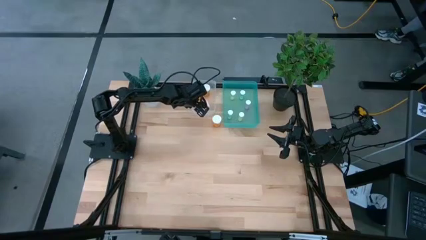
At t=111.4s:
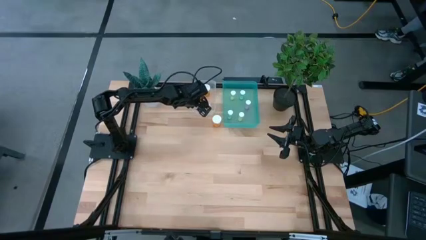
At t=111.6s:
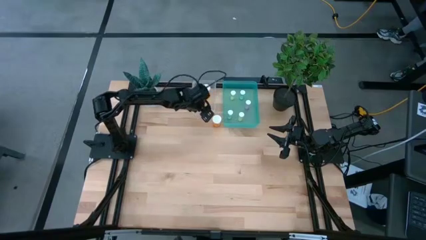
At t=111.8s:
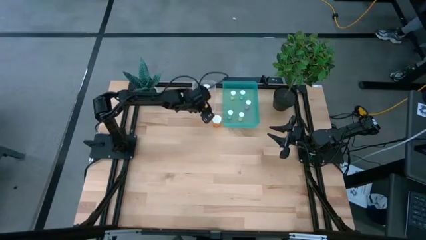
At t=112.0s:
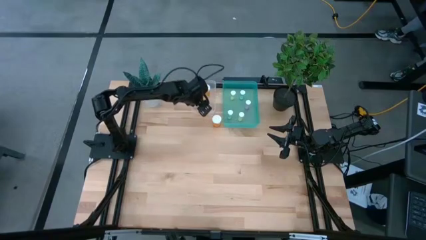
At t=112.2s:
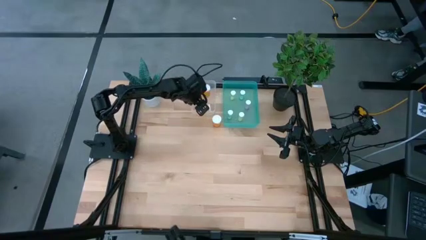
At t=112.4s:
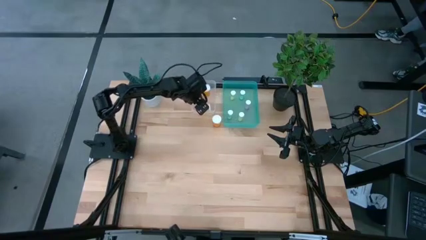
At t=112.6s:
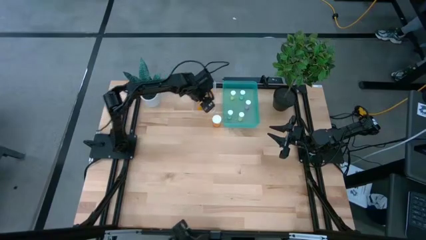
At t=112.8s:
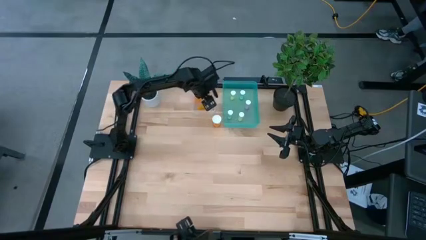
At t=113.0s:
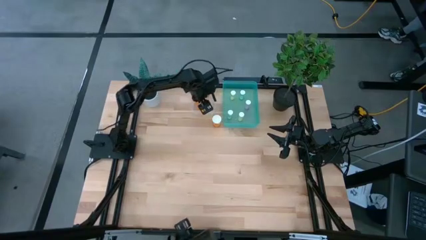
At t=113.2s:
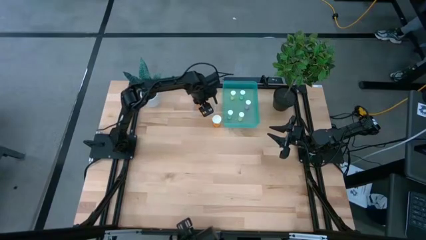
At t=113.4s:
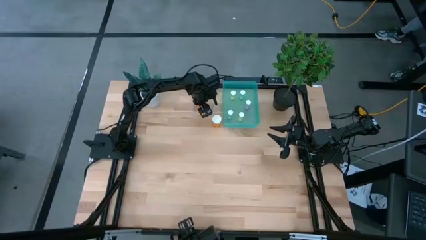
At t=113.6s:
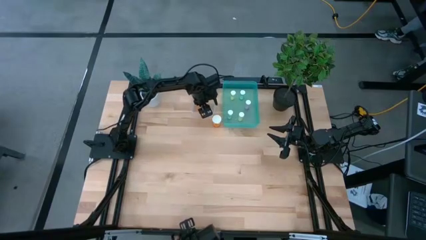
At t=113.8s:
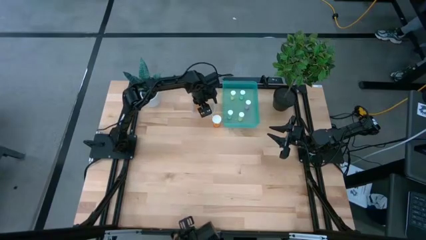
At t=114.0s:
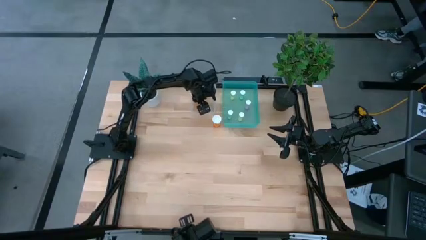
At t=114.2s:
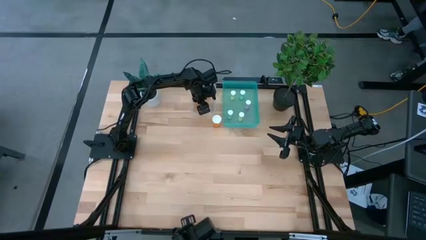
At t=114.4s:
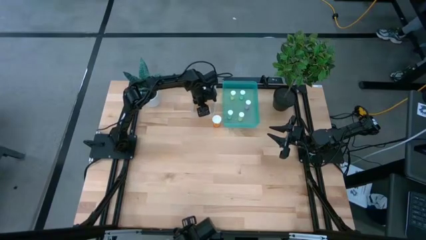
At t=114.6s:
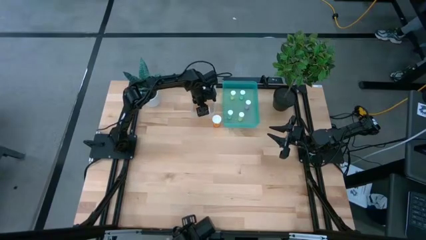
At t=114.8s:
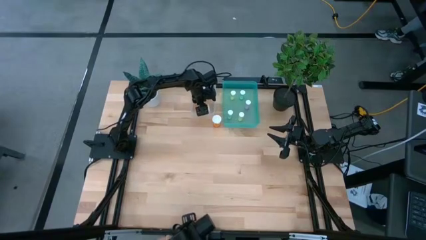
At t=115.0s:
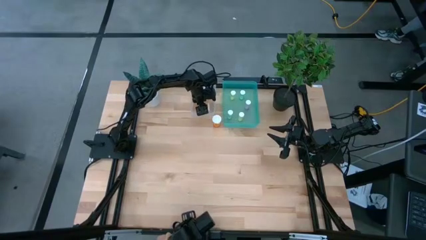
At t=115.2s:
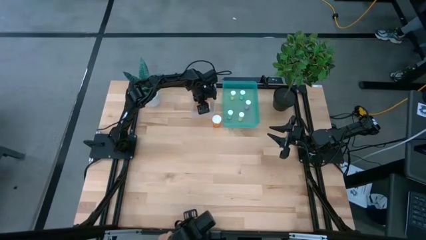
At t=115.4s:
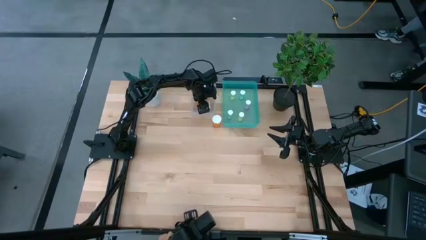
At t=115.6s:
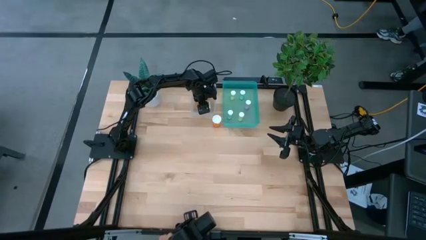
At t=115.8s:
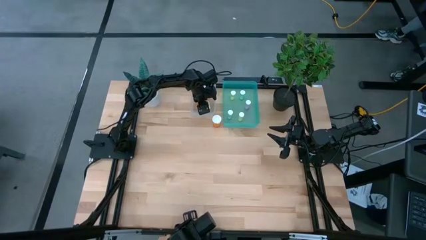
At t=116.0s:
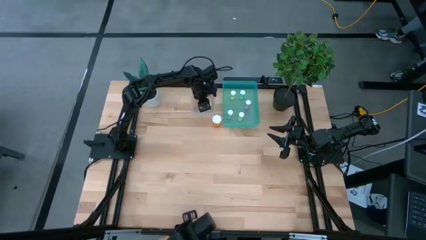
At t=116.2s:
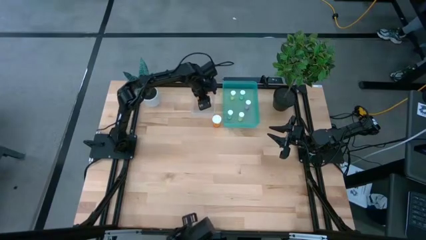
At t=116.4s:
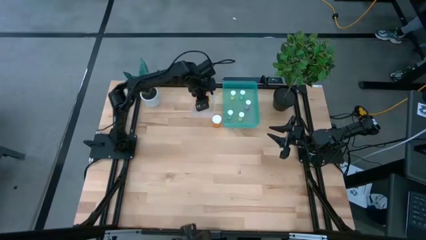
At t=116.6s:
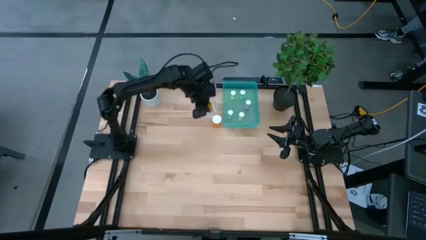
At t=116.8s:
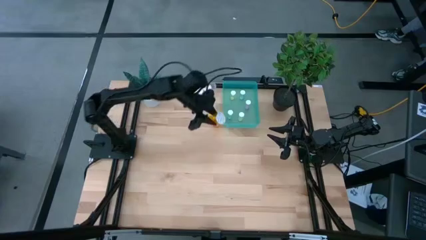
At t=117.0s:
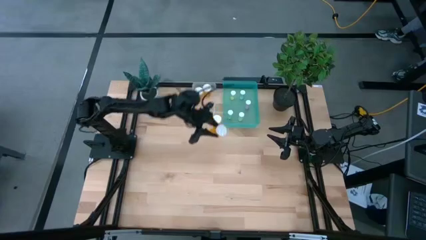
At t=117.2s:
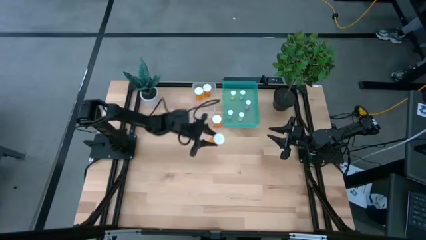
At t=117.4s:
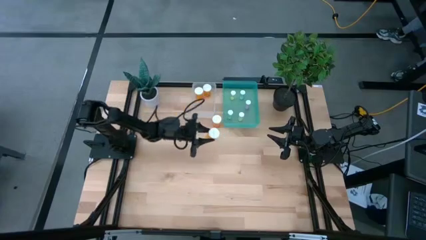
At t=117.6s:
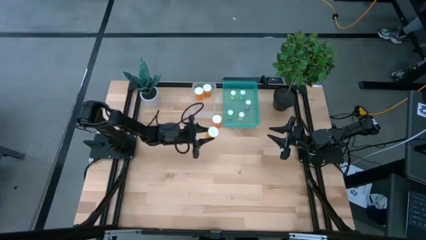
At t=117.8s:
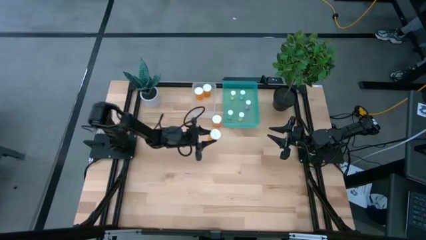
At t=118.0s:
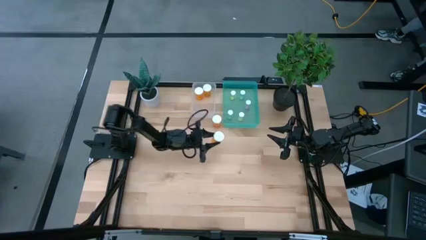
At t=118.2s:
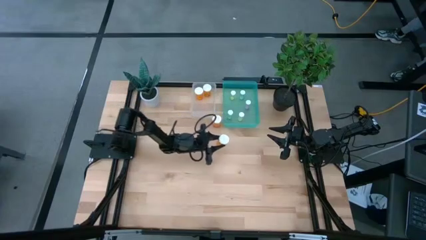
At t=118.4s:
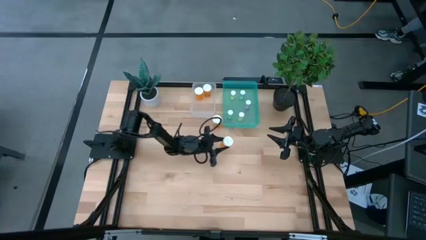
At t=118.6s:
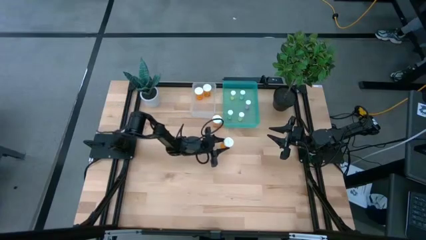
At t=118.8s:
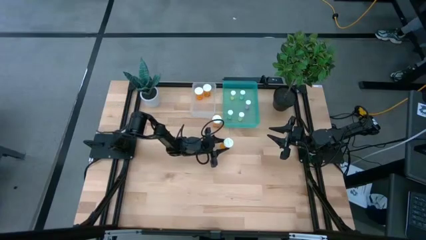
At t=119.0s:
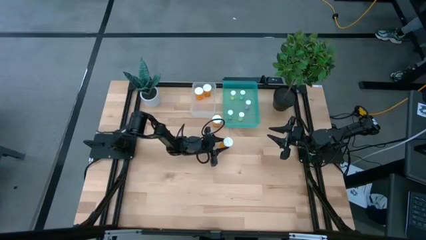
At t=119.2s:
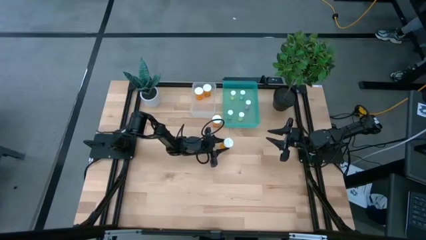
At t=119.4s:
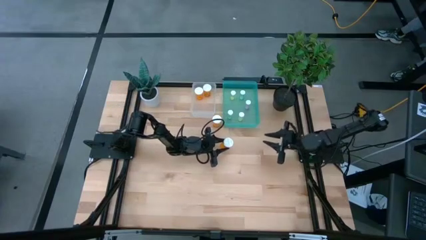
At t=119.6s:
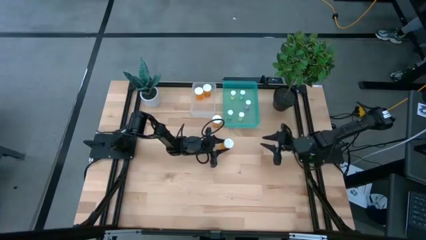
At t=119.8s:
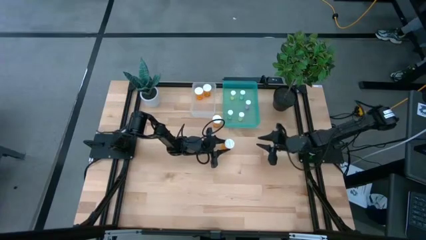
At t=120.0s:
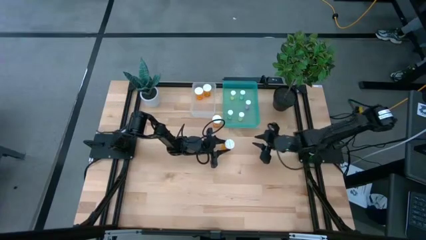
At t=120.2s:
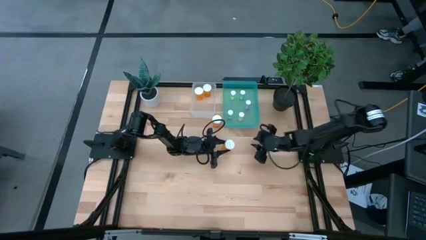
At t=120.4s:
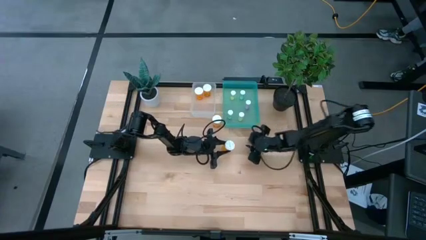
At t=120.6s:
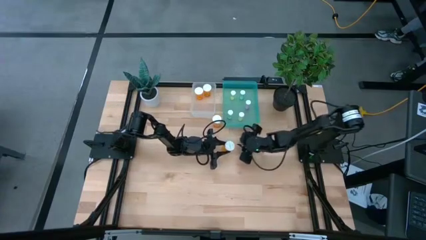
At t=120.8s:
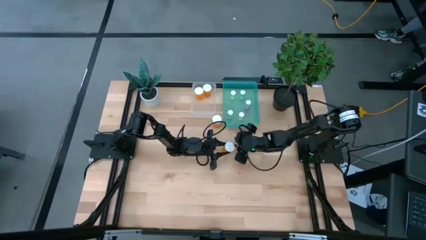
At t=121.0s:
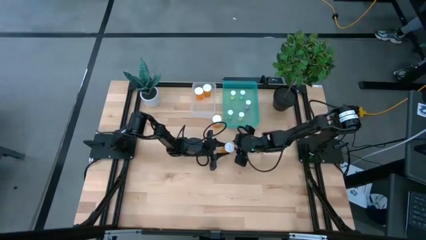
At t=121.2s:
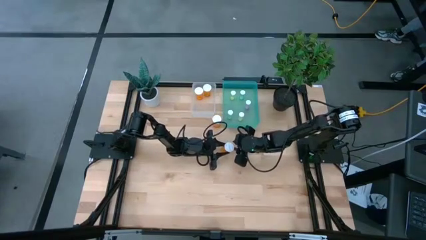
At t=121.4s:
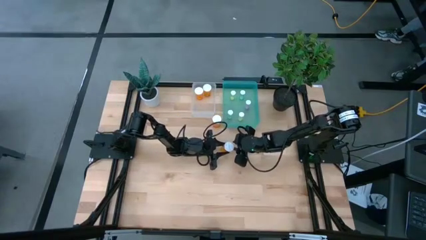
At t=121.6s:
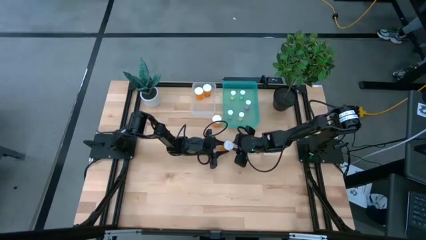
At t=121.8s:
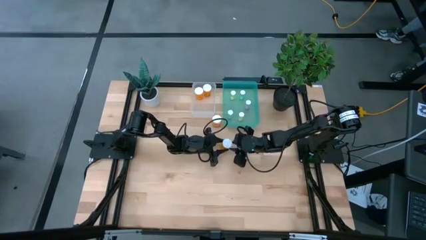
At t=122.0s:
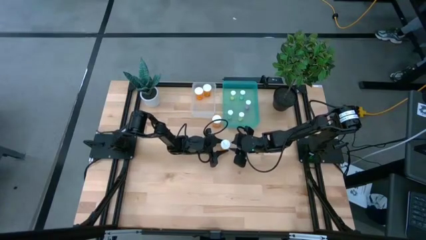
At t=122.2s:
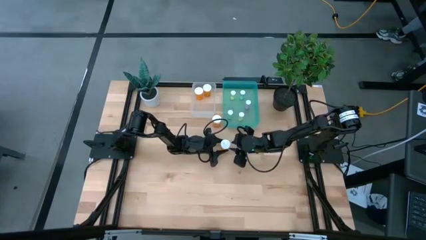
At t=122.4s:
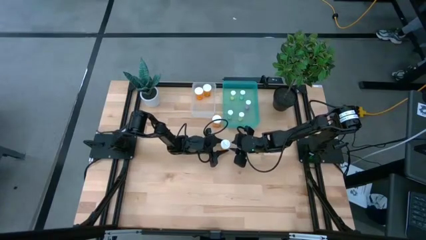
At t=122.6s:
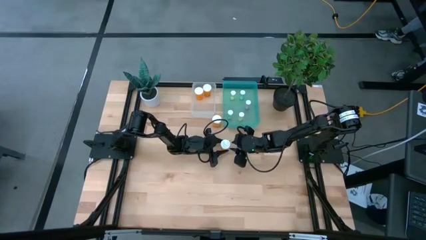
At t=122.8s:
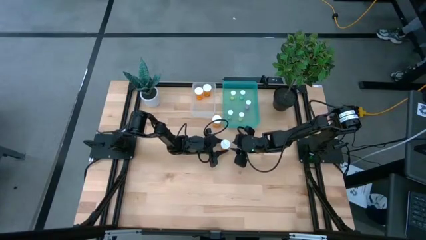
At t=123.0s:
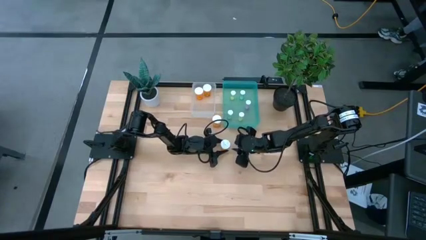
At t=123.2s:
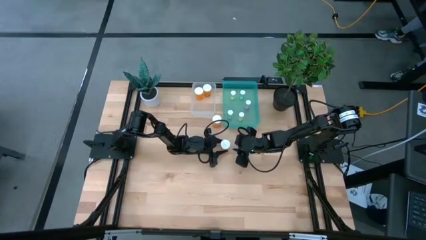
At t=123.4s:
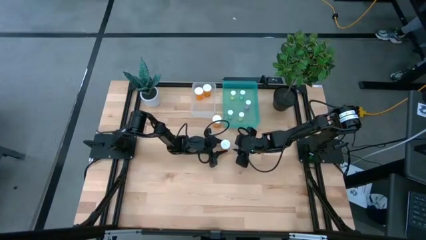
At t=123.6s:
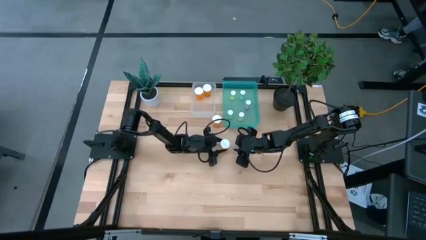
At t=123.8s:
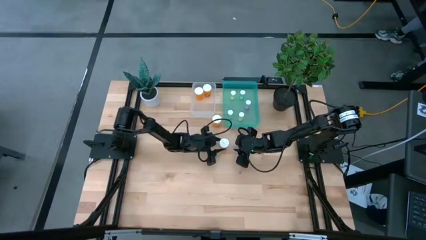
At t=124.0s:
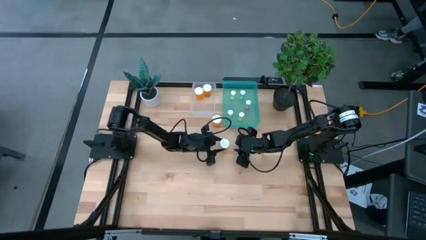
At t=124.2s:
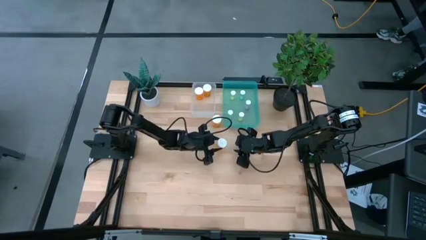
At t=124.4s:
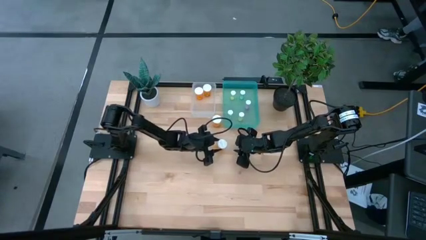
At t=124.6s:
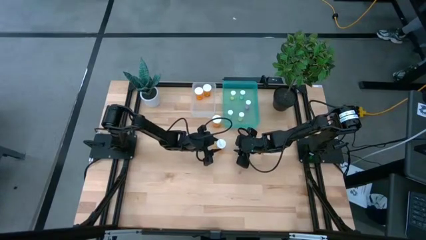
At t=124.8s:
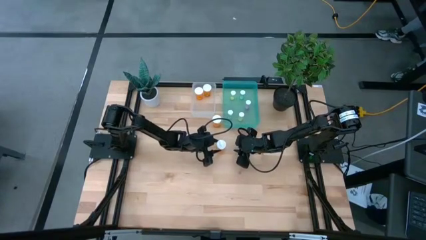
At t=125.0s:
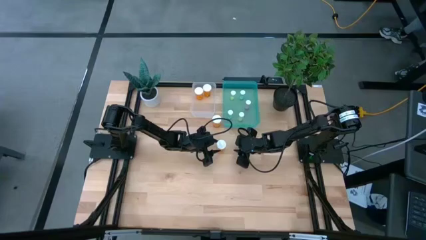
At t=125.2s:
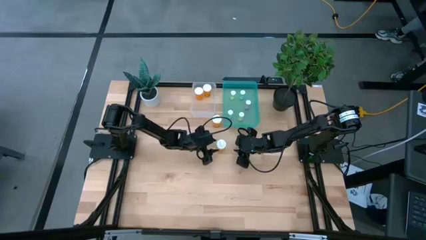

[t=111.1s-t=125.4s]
Task: Pick and place medicine bottles into bin by pill shape (circle, oval)
Remove the orange capsule bottle from the transparent bin
